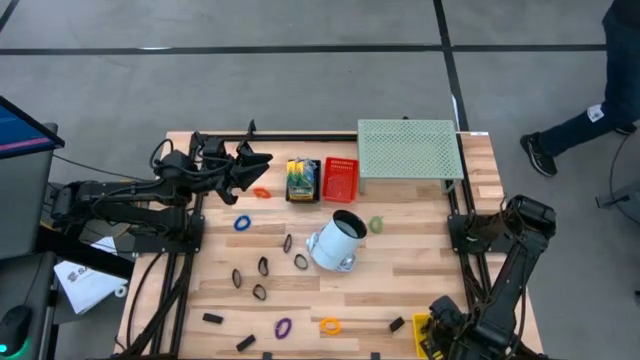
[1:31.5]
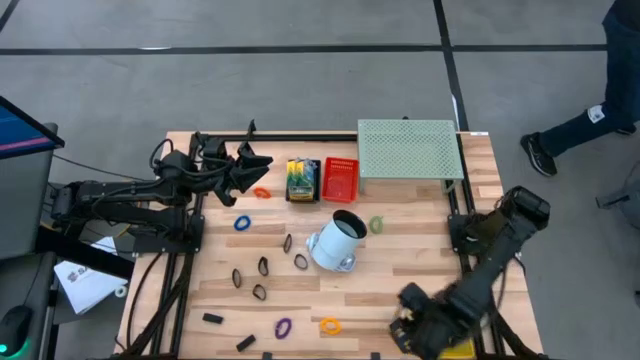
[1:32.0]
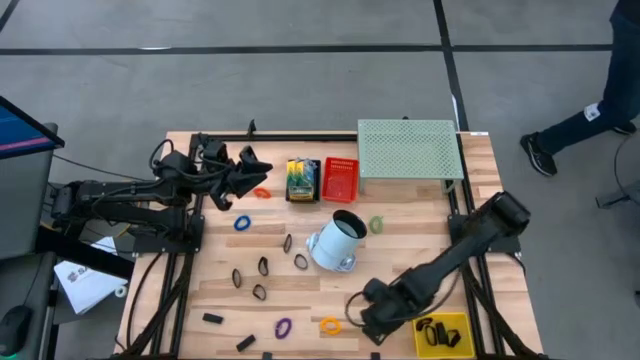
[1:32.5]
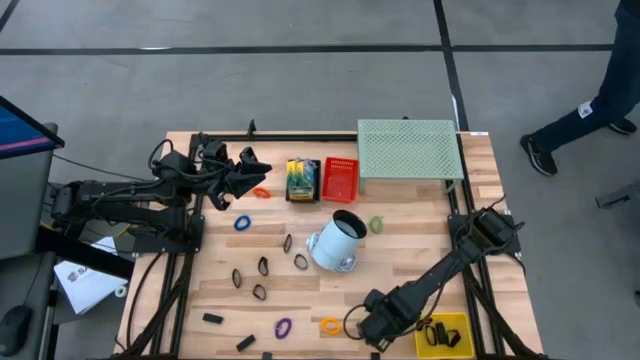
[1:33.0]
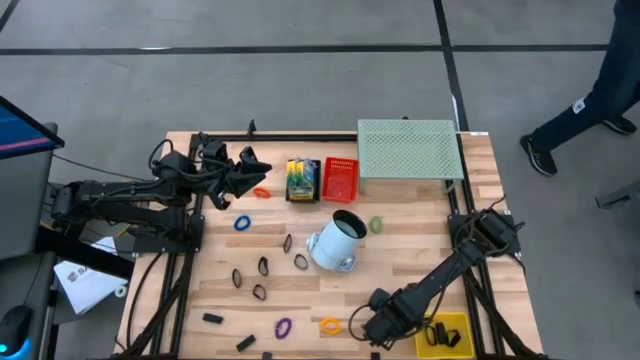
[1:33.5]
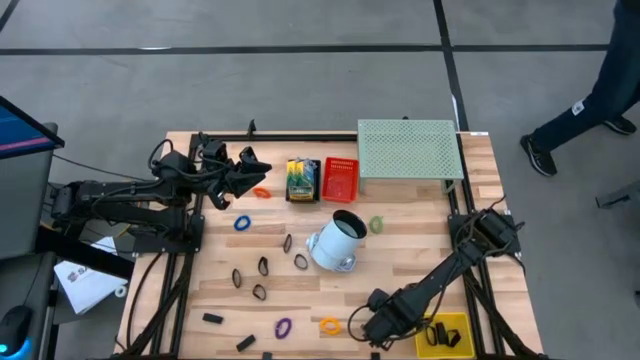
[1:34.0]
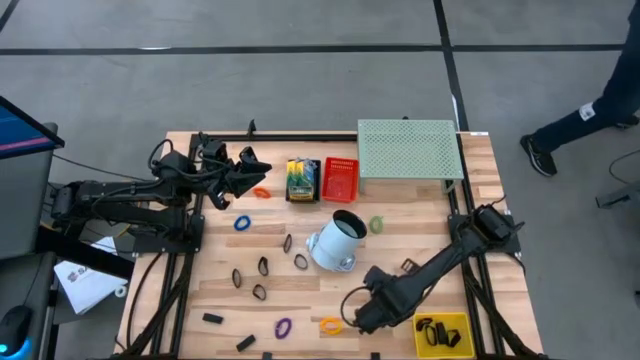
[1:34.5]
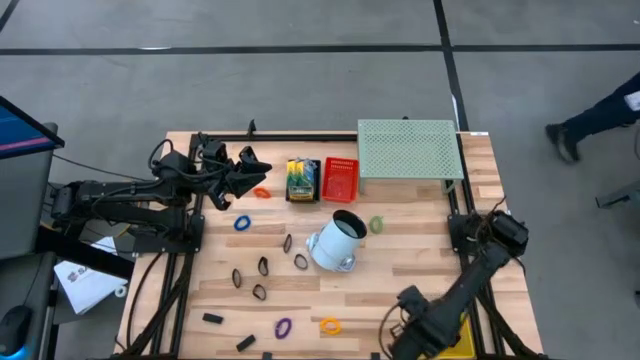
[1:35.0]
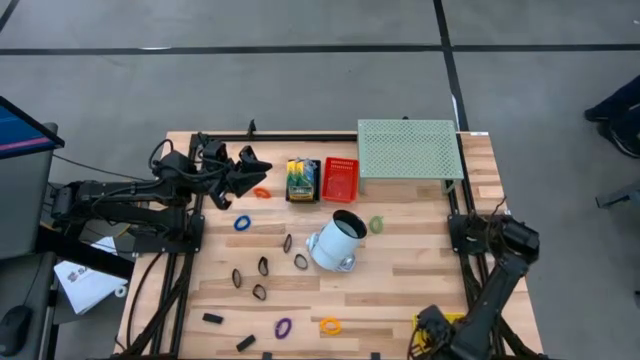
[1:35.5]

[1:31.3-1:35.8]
Task: Pick & Place Office Desk Supplies
Put the black rubber band into the yellow bin

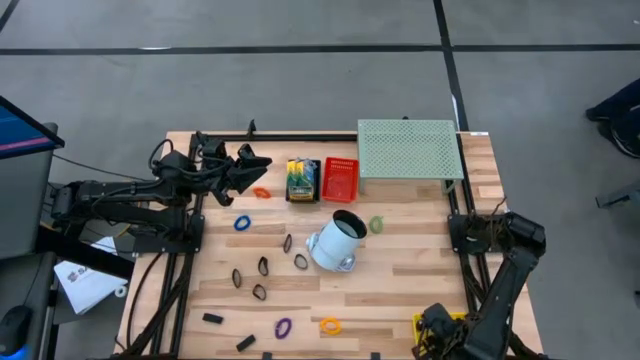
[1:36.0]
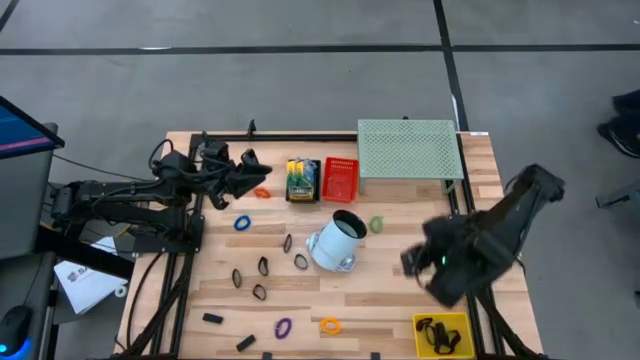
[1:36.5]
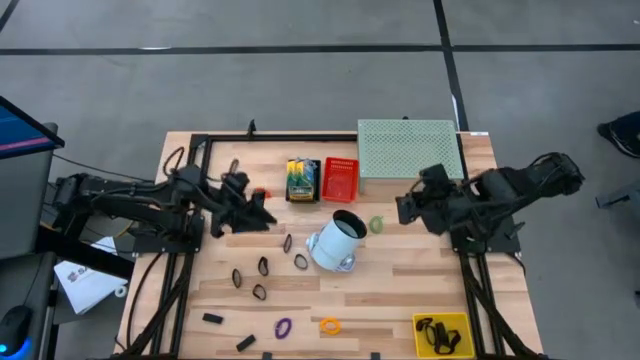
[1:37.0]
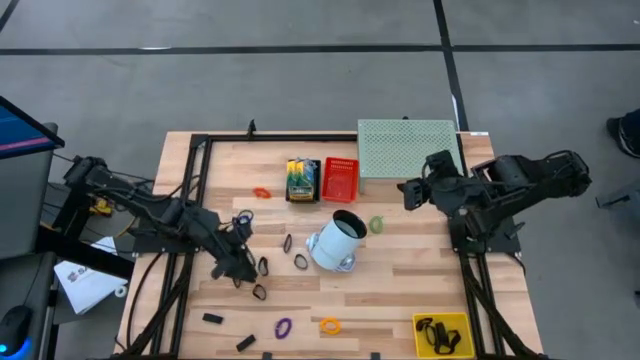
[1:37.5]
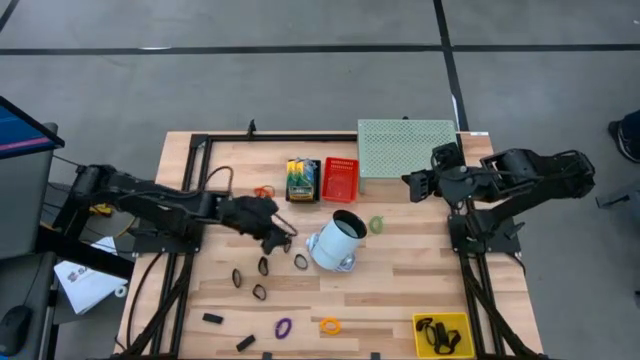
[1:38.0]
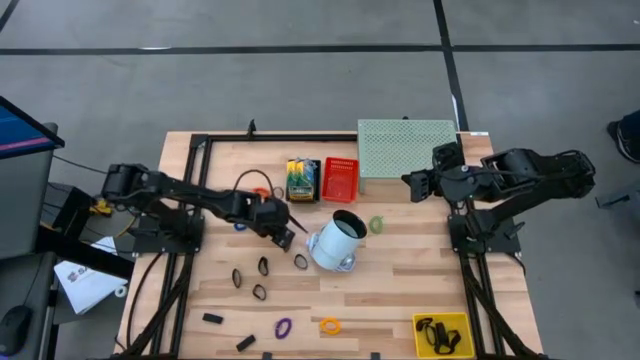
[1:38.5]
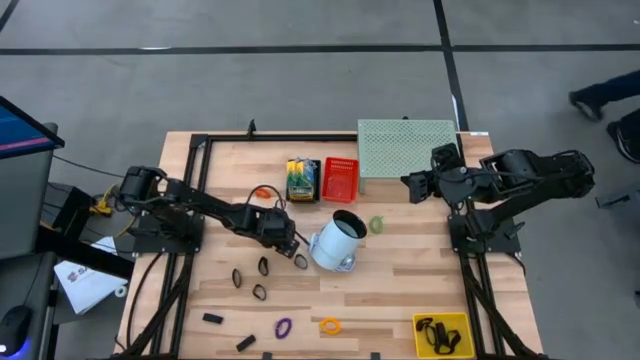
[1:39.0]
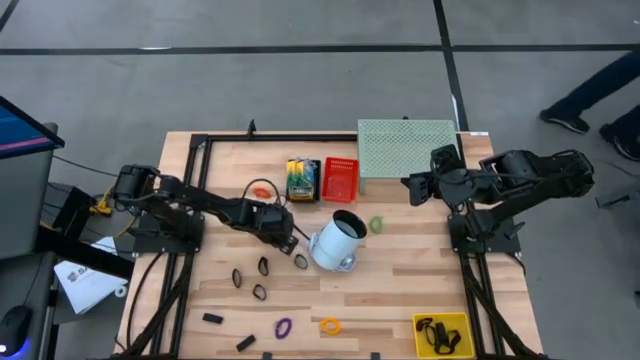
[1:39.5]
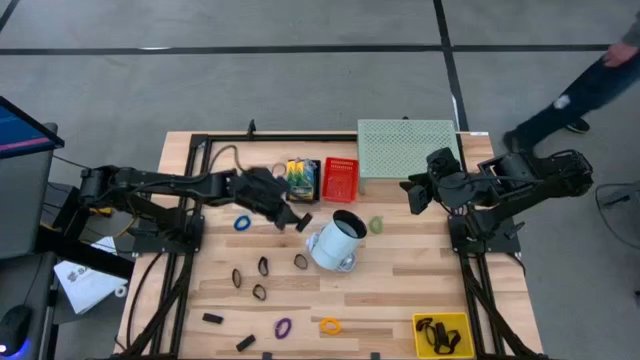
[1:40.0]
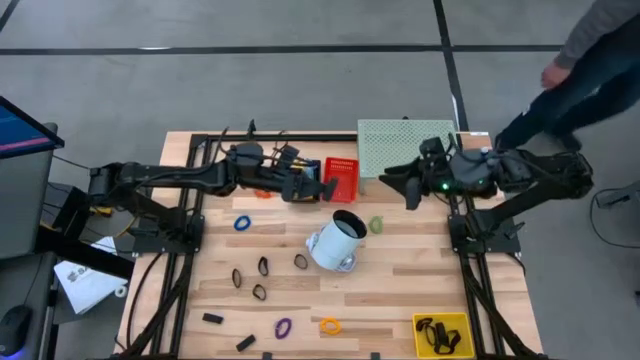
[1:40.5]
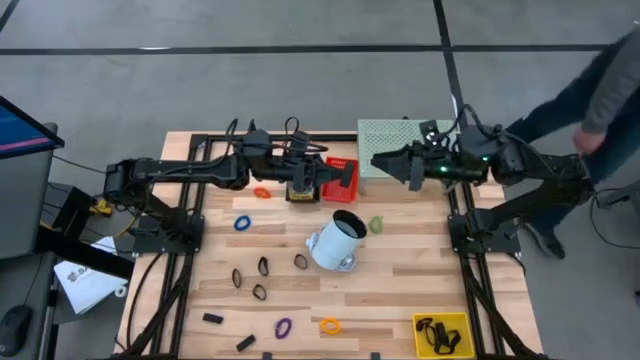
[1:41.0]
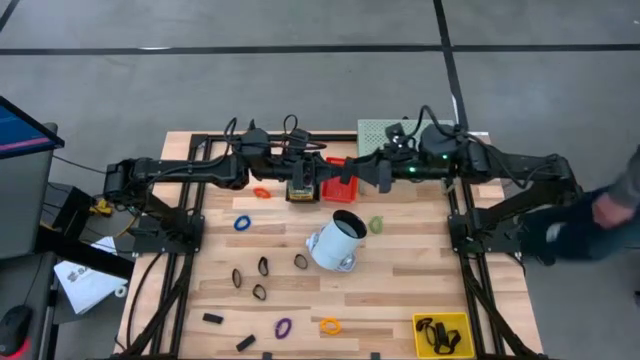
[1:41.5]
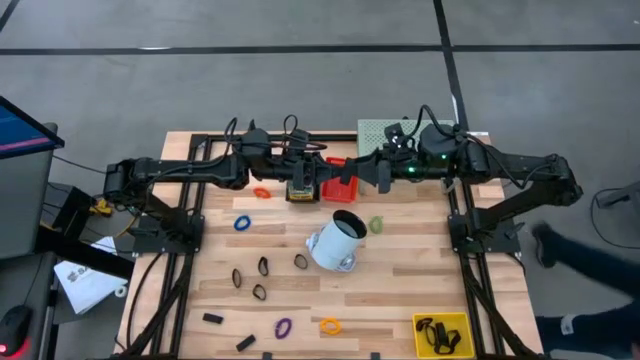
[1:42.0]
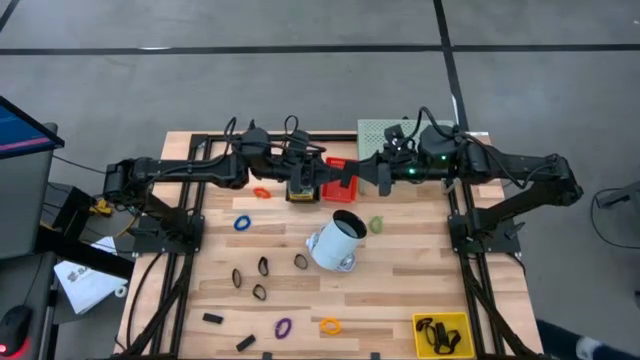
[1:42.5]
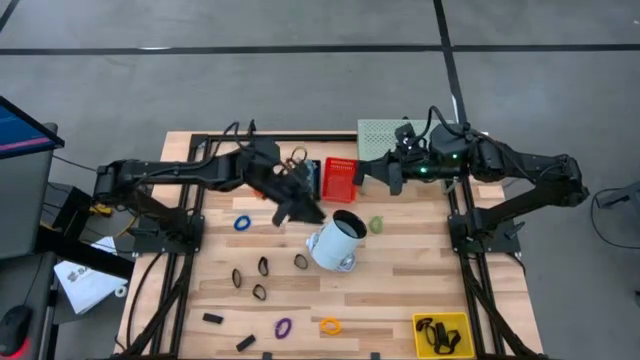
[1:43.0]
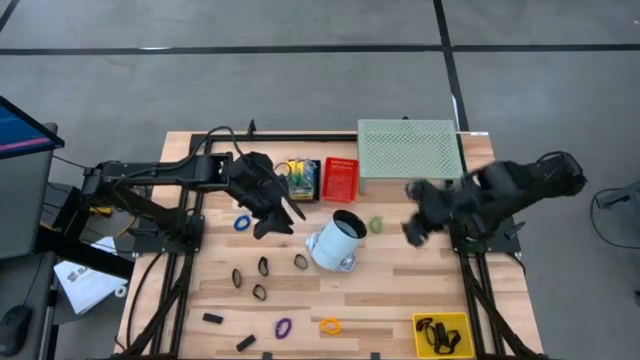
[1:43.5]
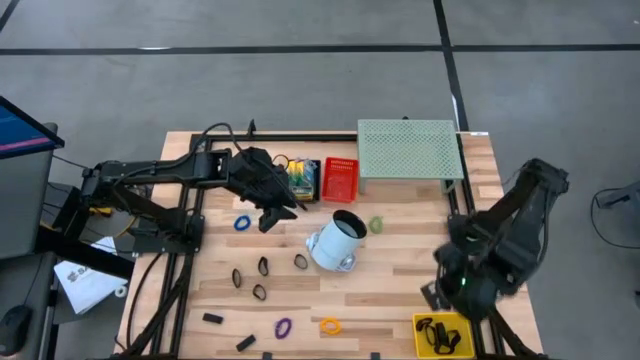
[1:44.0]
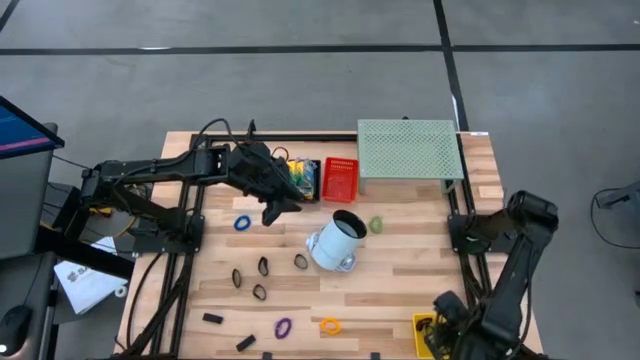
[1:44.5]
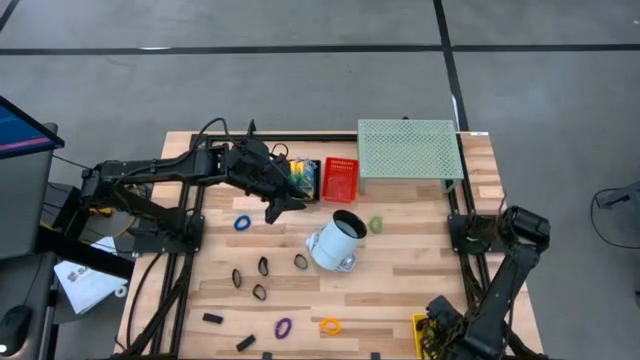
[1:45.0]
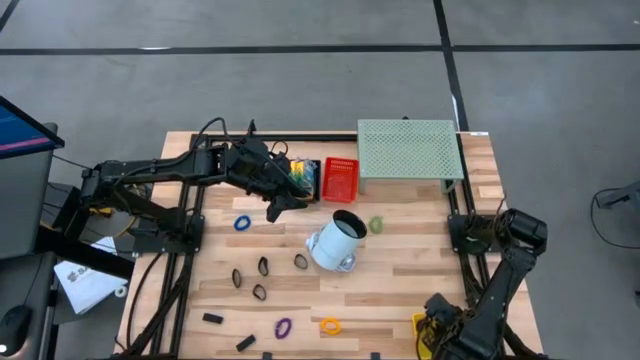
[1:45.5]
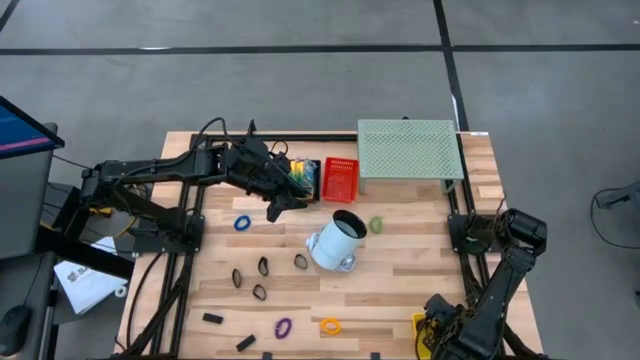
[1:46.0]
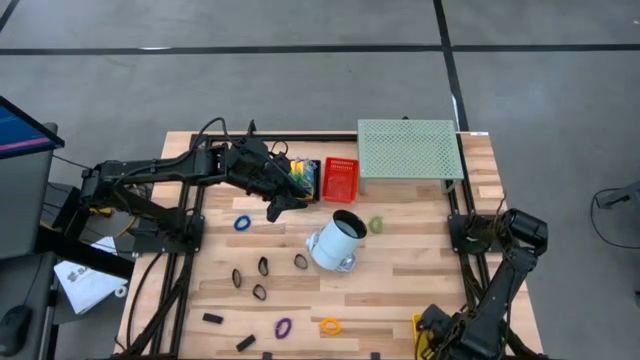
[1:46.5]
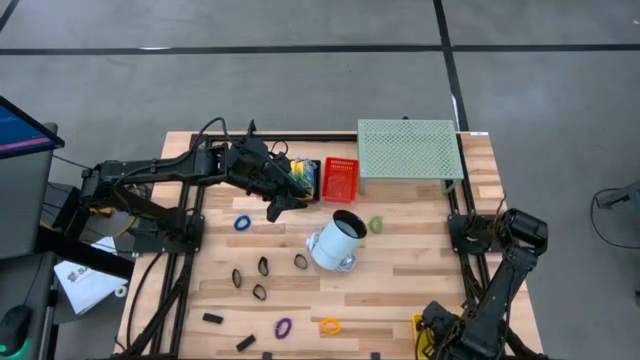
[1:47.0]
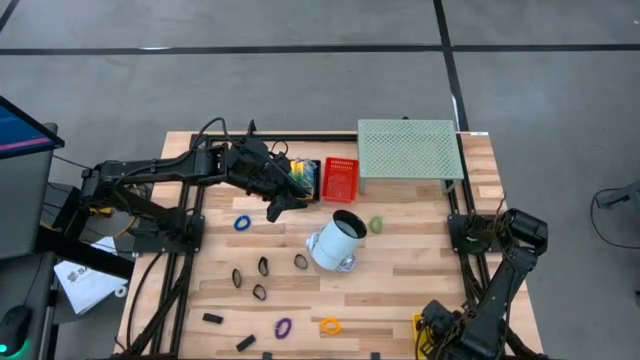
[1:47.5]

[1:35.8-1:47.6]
Put the black rubber band into the yellow bin

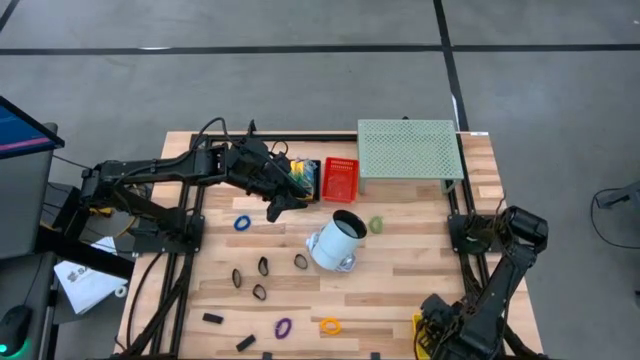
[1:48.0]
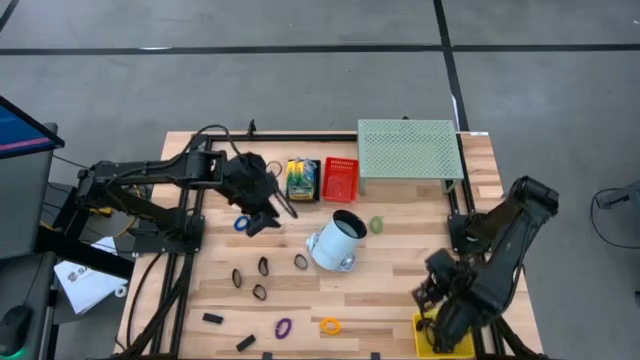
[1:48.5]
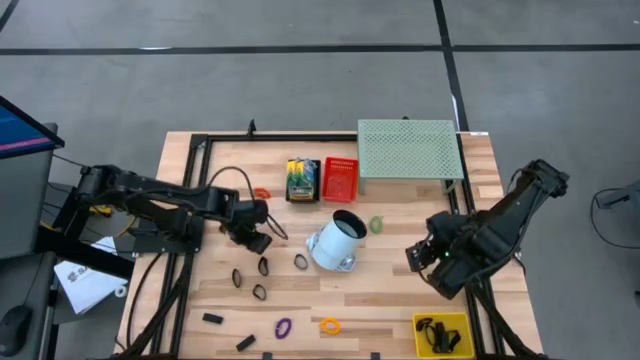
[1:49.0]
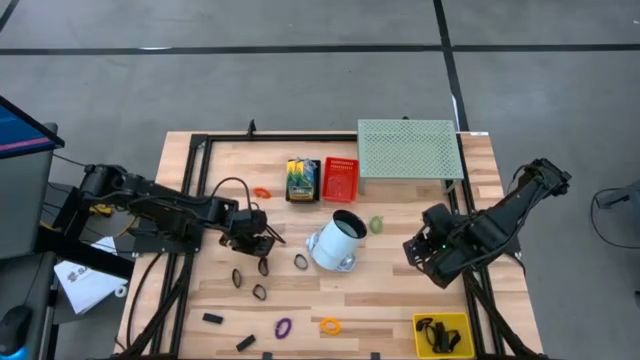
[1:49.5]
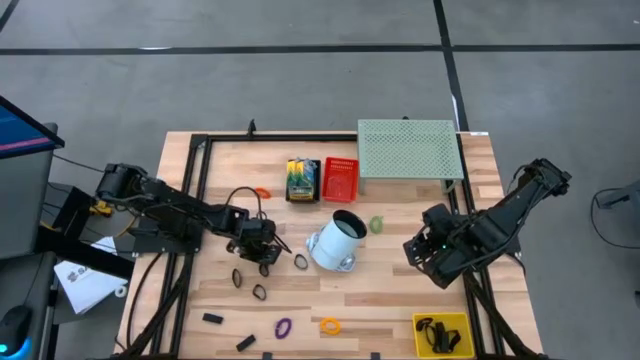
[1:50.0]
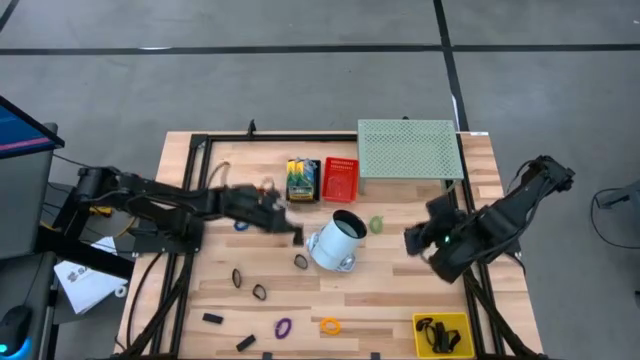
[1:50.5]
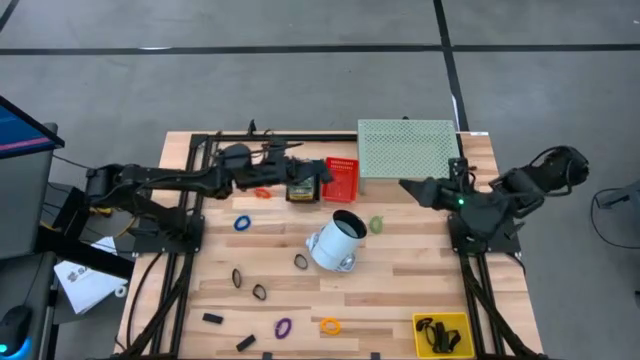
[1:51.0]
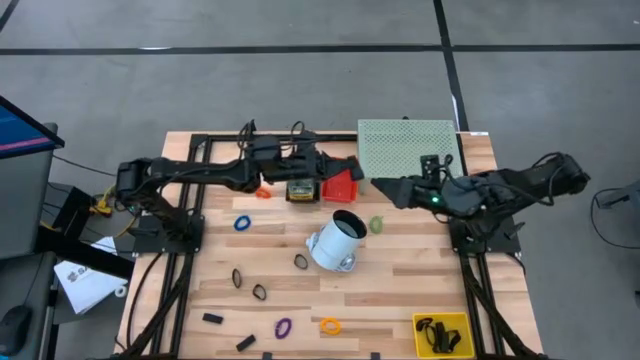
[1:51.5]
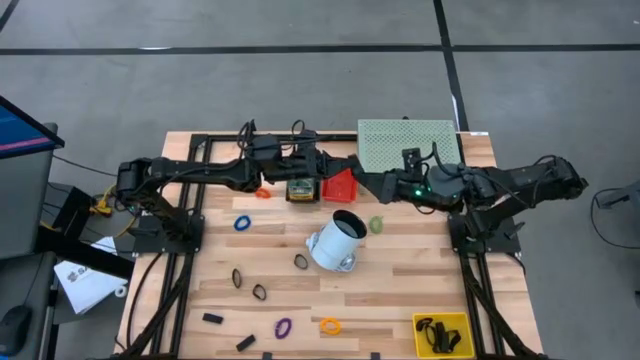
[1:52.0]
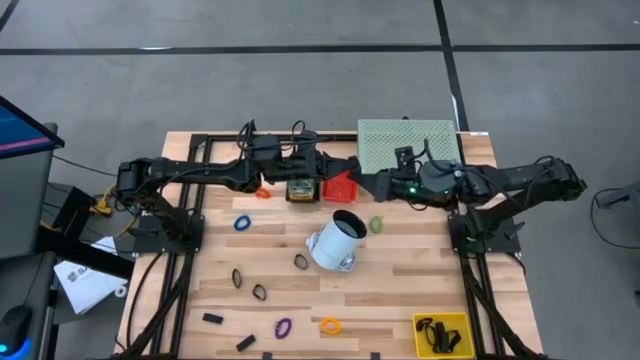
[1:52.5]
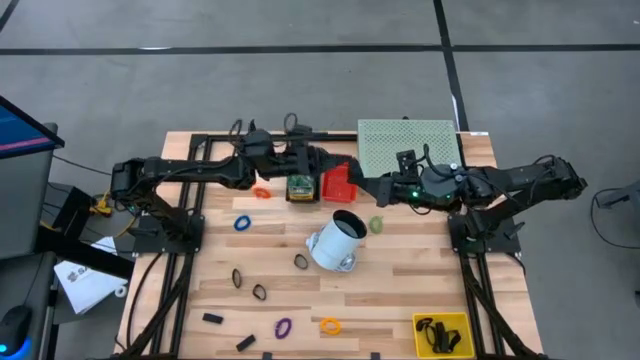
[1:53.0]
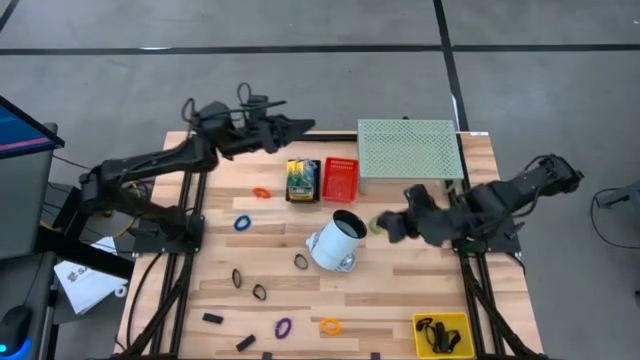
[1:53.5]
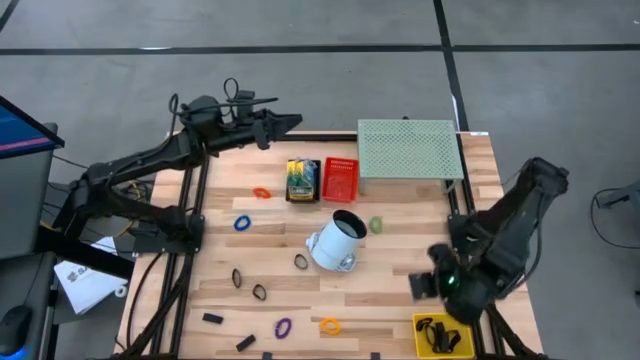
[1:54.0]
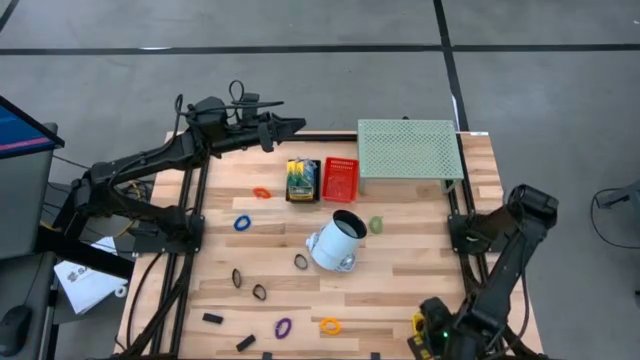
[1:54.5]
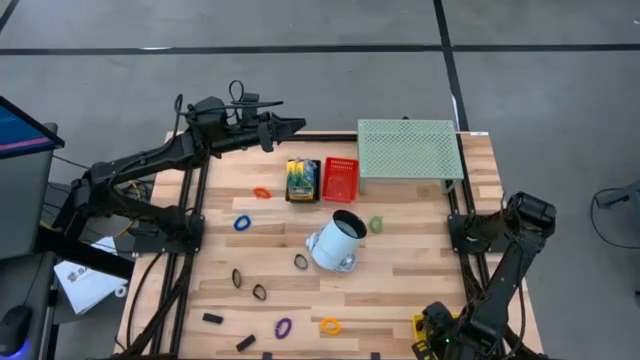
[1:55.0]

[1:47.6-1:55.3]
Put the black rubber band into the yellow bin
